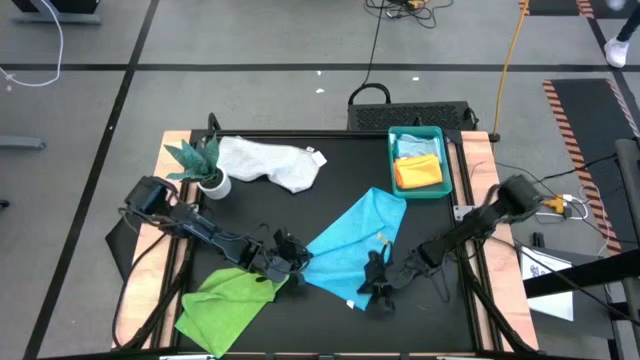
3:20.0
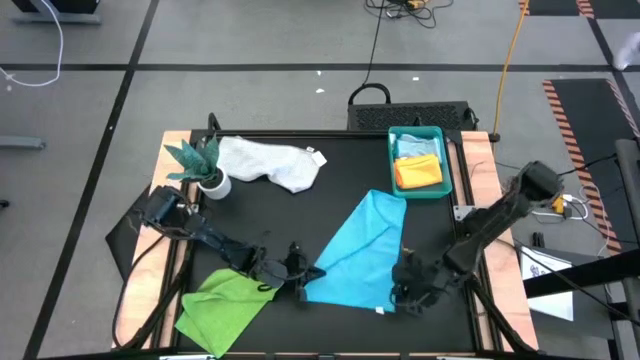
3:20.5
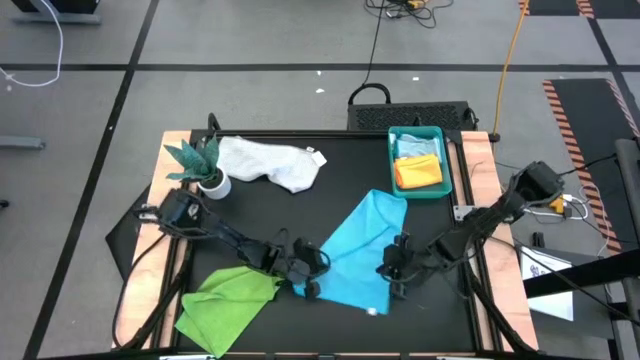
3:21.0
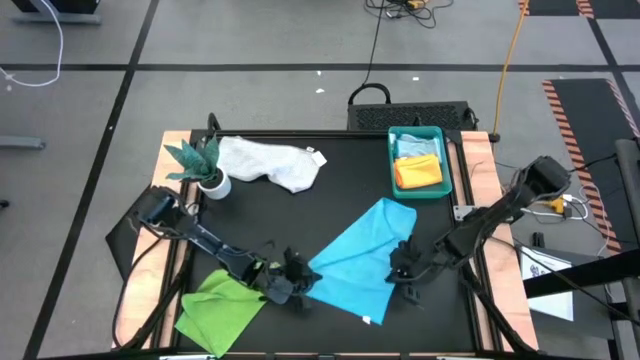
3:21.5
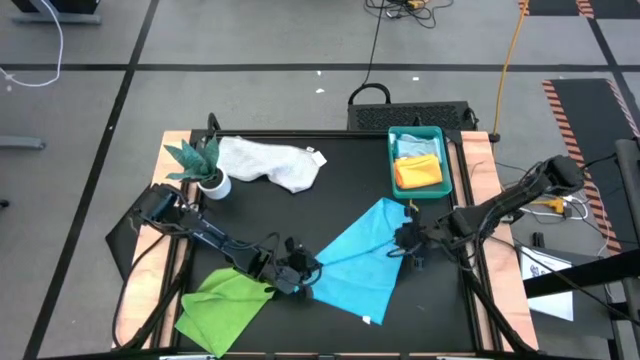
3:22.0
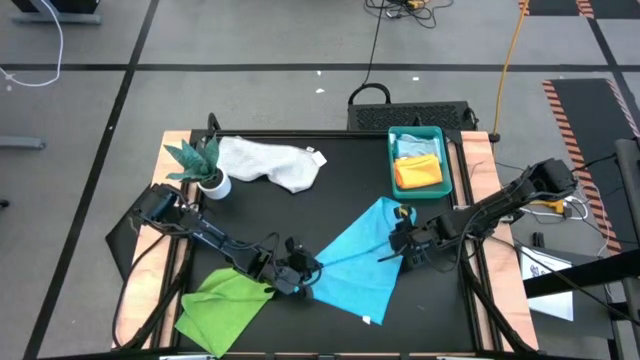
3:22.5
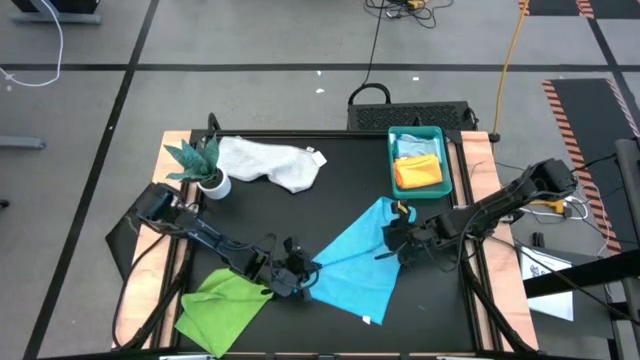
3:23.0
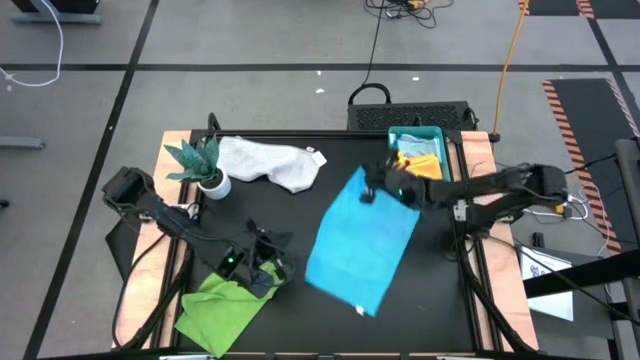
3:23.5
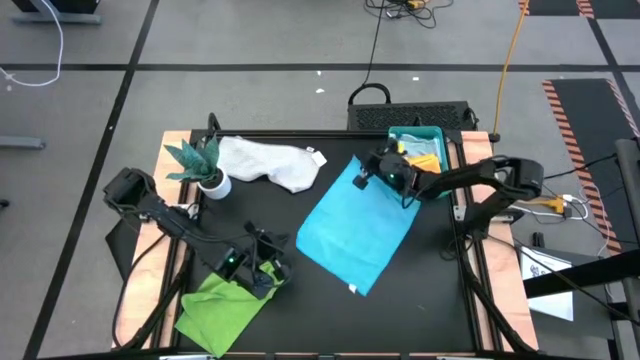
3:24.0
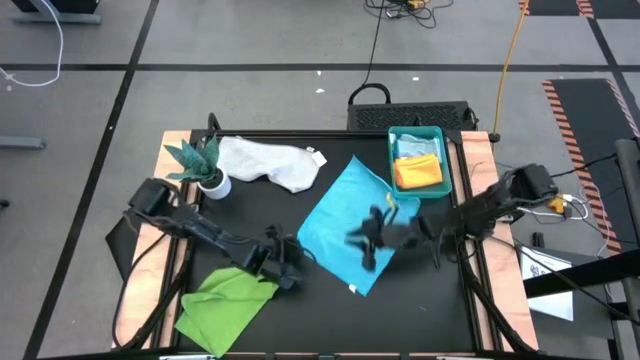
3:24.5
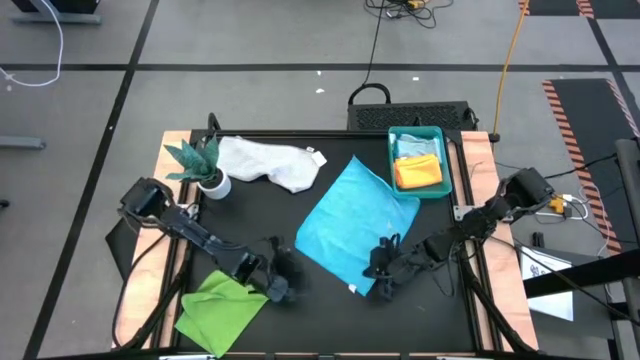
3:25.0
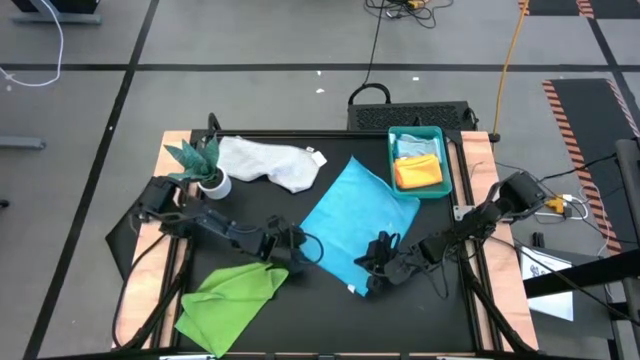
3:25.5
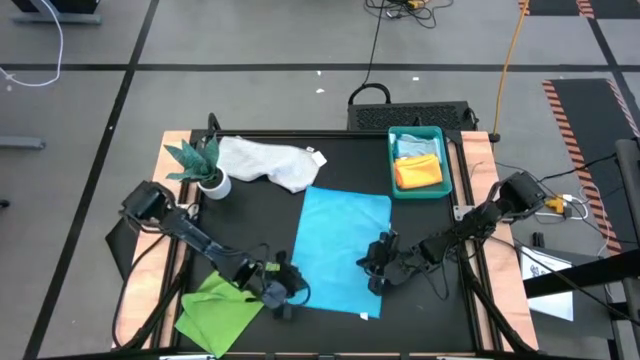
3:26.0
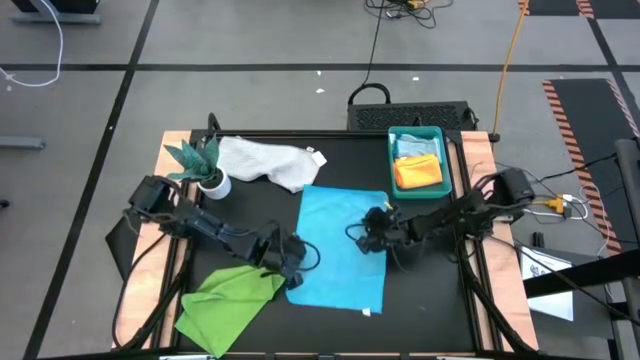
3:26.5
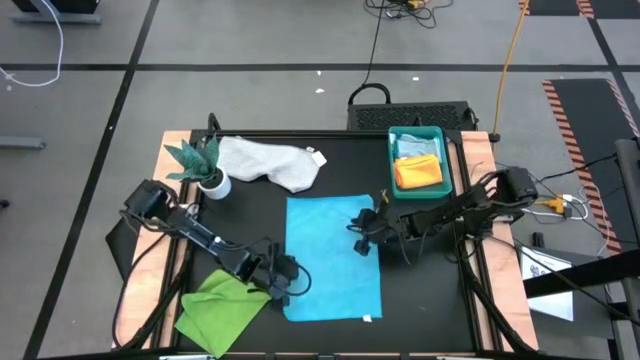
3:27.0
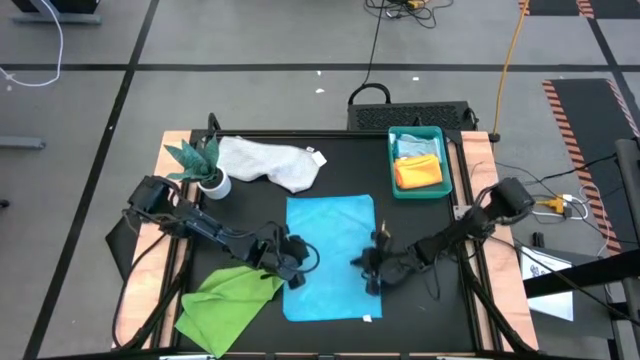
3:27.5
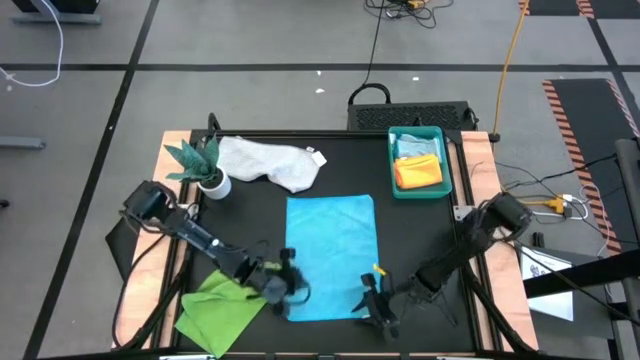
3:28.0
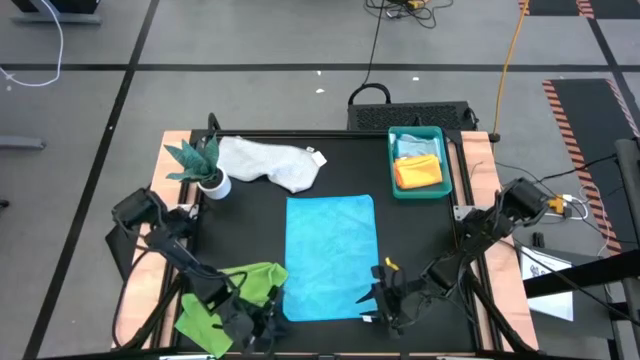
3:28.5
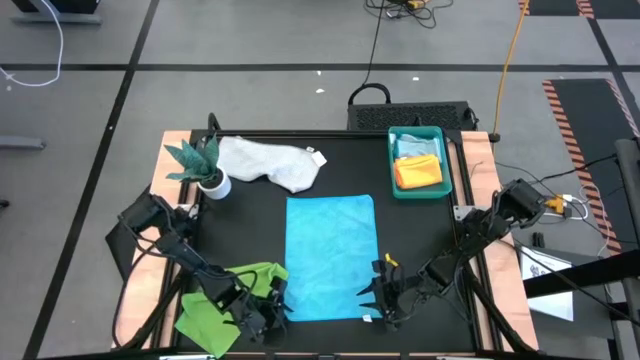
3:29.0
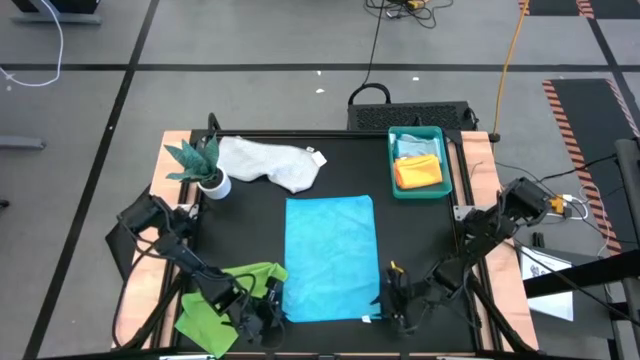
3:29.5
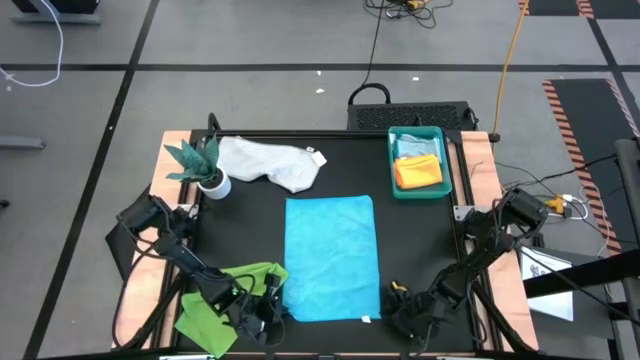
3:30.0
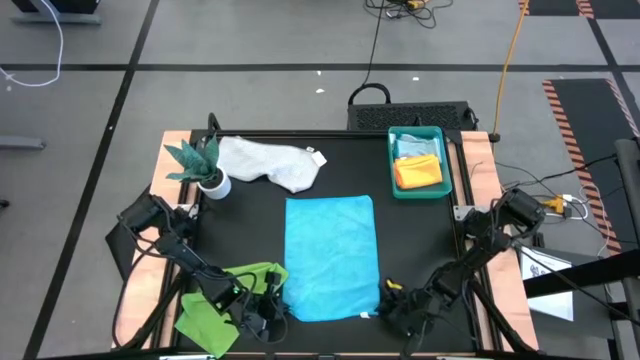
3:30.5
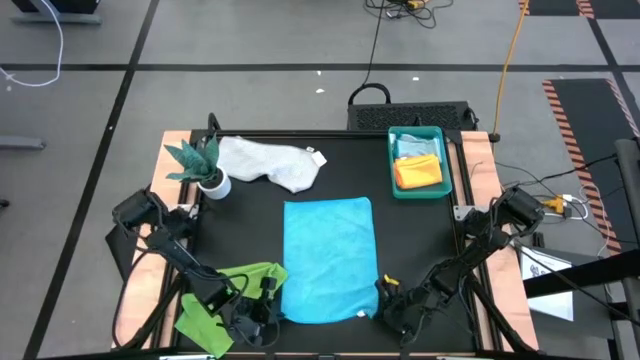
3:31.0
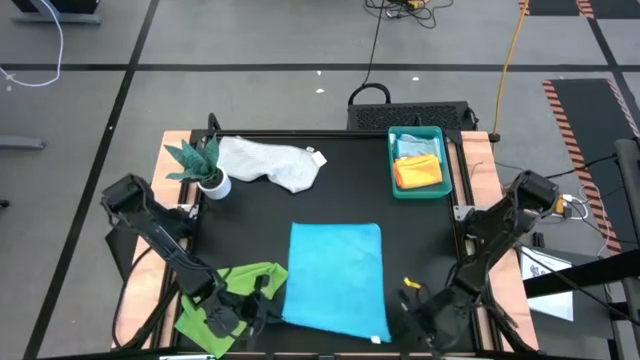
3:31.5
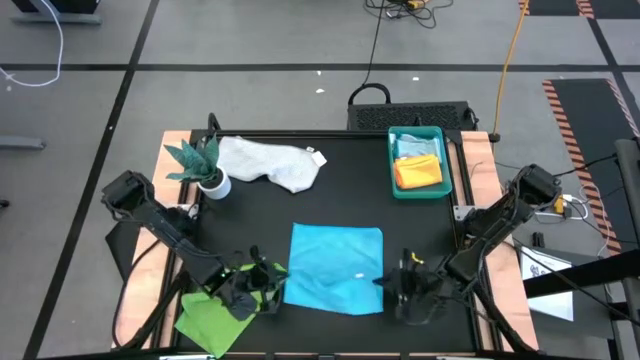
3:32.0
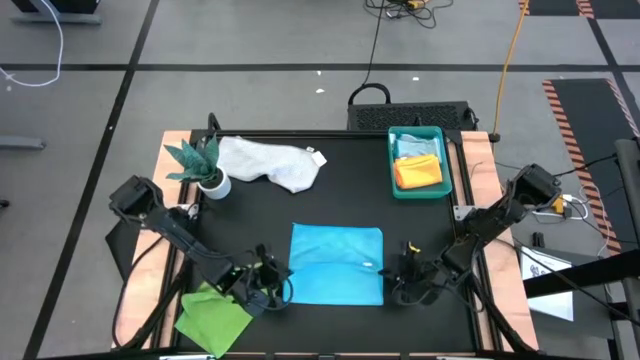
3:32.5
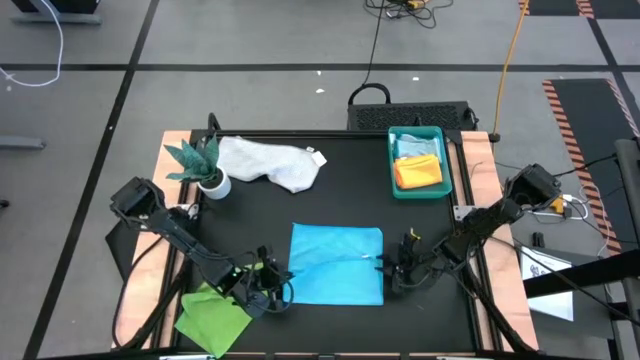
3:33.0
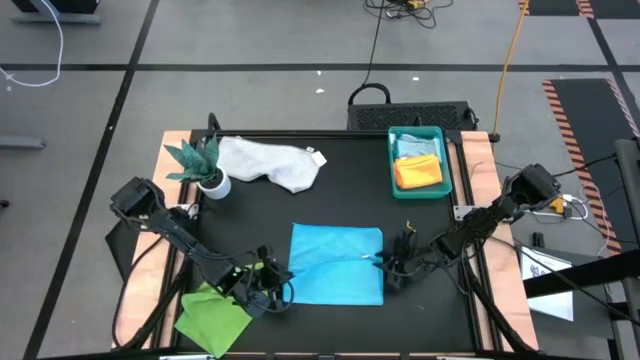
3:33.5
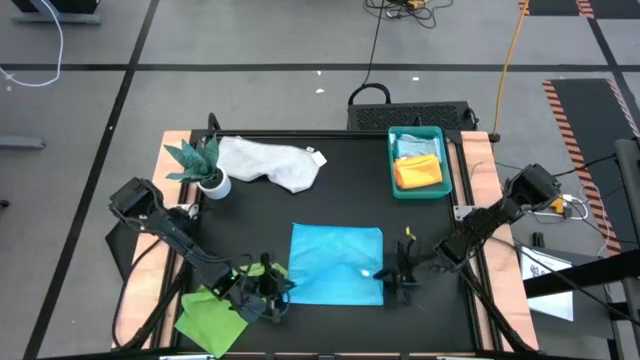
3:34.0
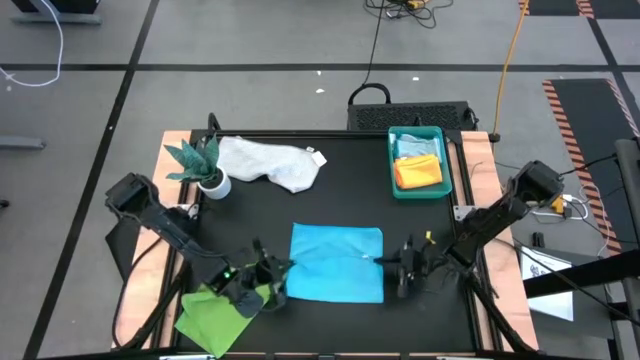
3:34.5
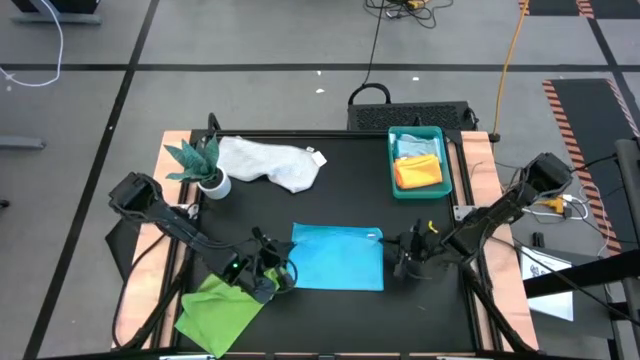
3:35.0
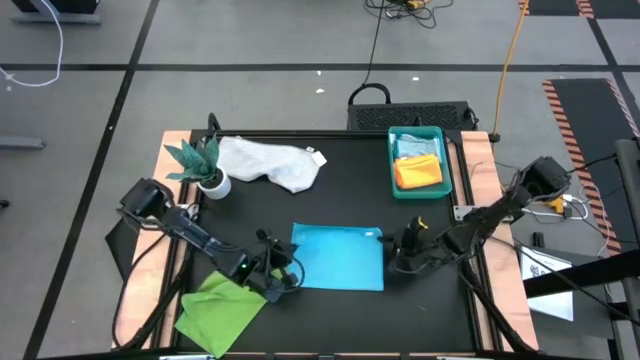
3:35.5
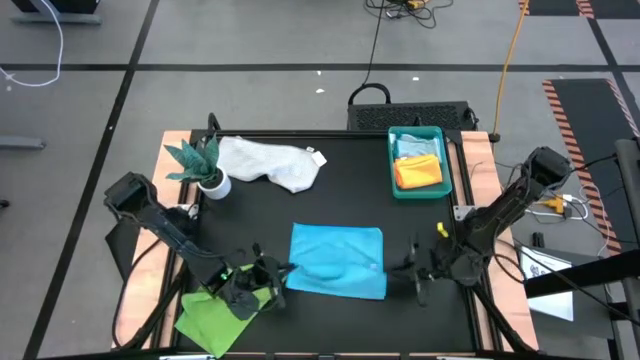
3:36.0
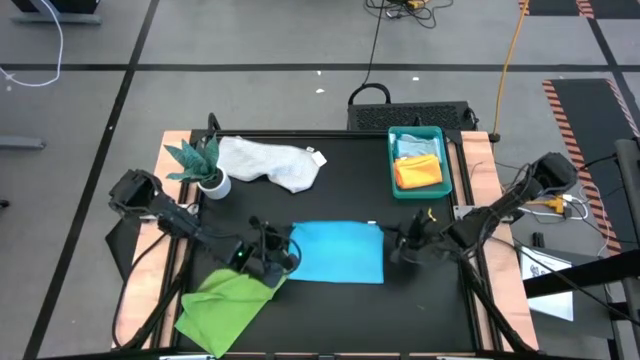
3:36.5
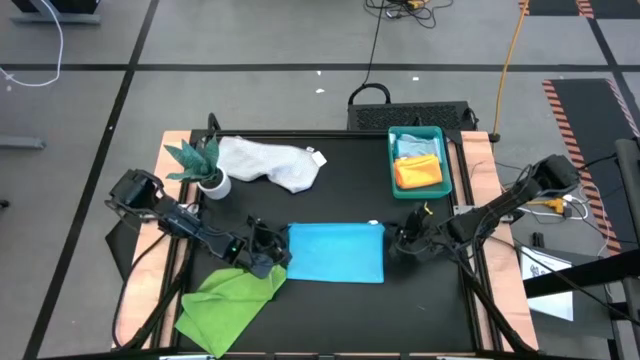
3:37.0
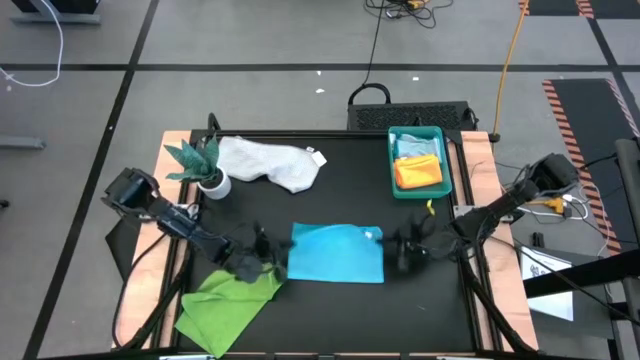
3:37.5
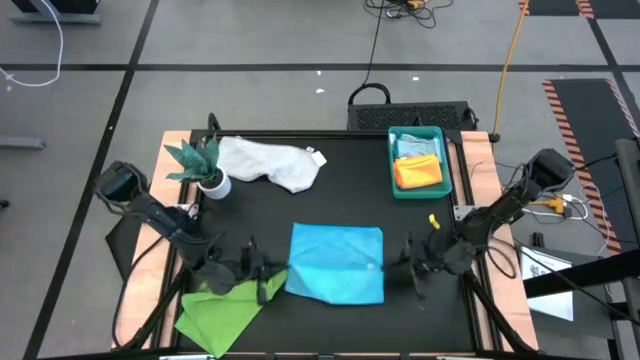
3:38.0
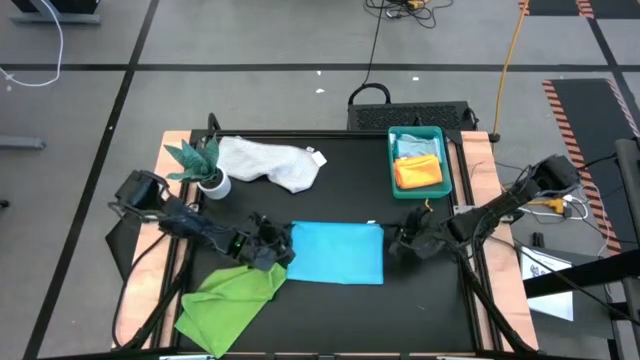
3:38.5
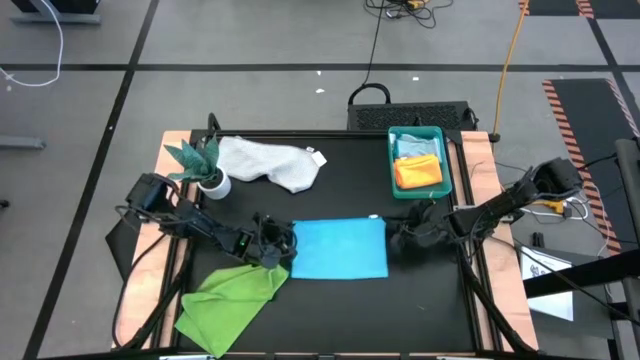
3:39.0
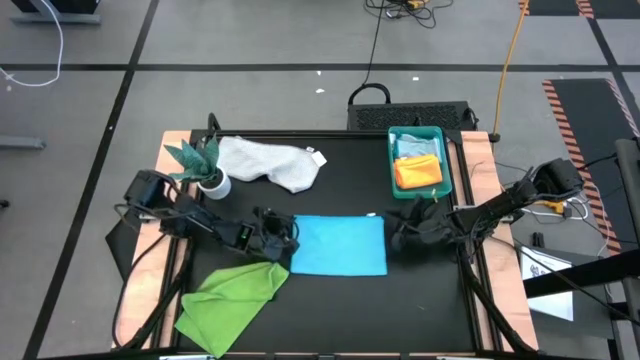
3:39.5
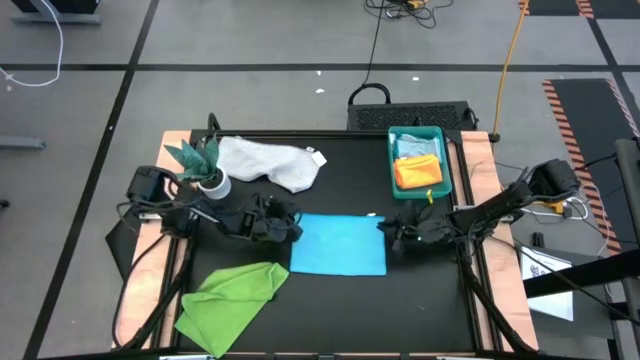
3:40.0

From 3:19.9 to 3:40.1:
Task: Fold microfiber towels
Fold the blue microfiber cloth

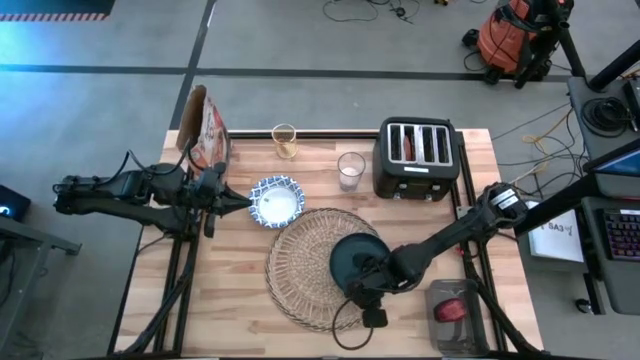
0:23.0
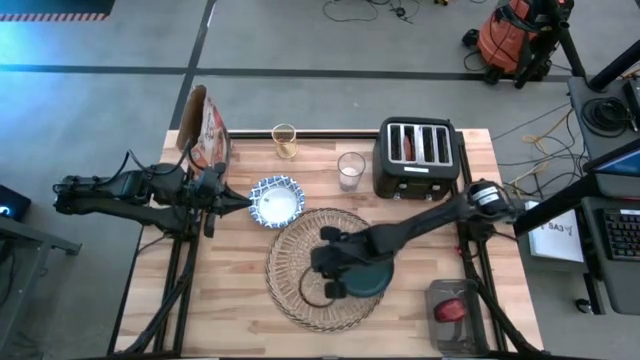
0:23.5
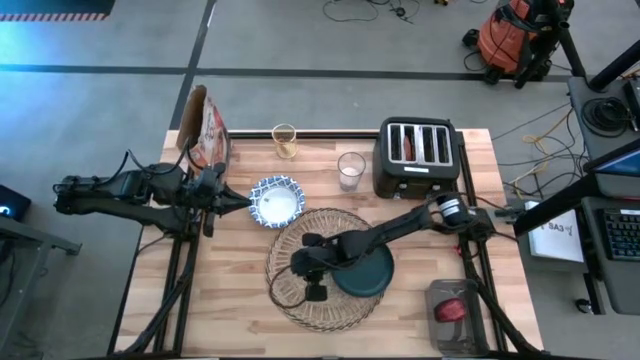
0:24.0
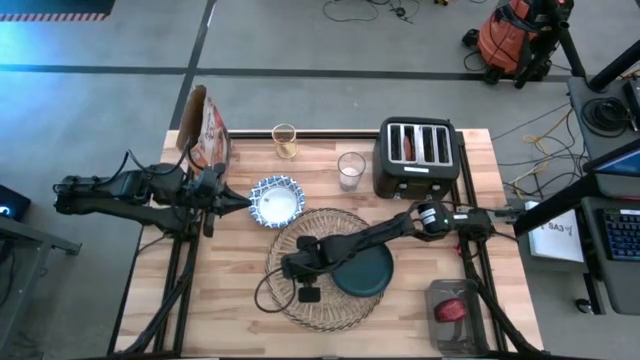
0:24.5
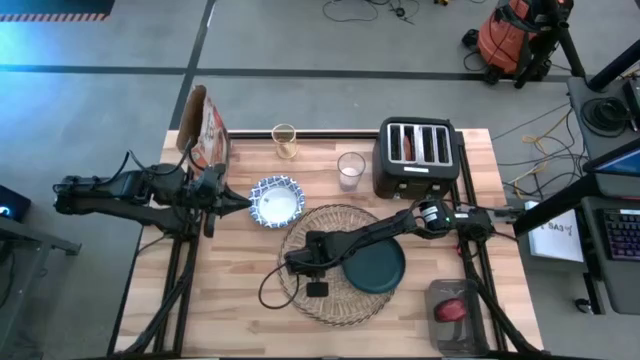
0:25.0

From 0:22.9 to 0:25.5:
Task: Arrange a breakfast setting
Adjust the brown table mat on the table
